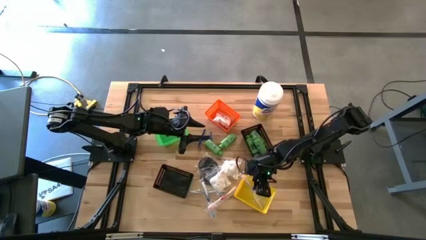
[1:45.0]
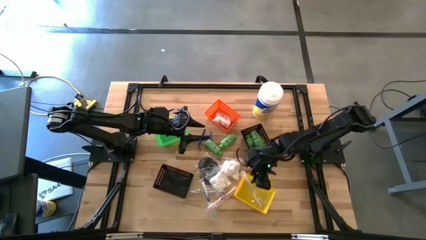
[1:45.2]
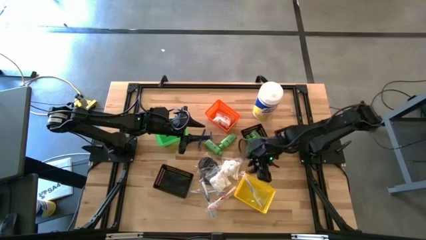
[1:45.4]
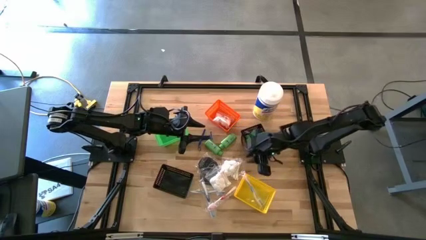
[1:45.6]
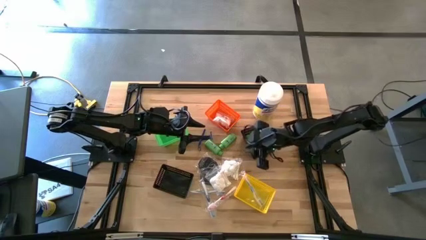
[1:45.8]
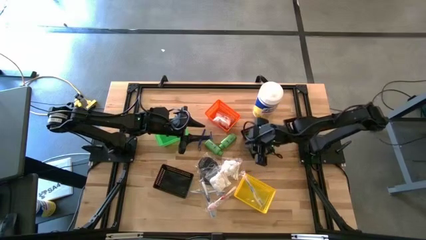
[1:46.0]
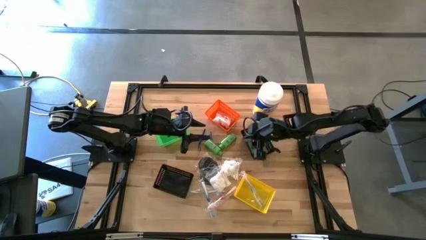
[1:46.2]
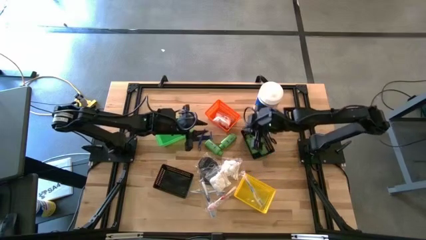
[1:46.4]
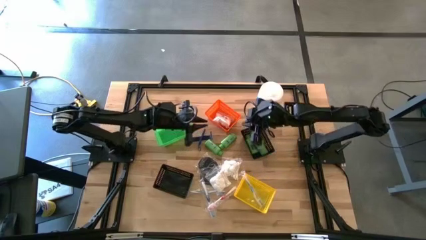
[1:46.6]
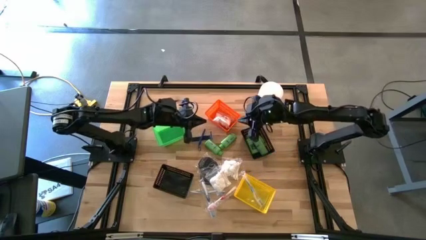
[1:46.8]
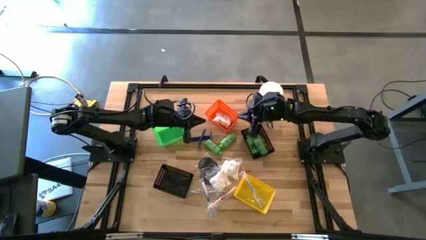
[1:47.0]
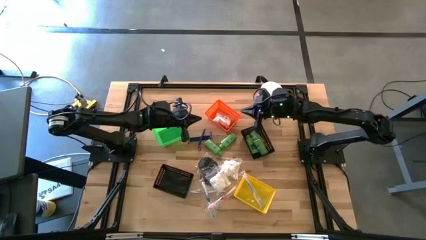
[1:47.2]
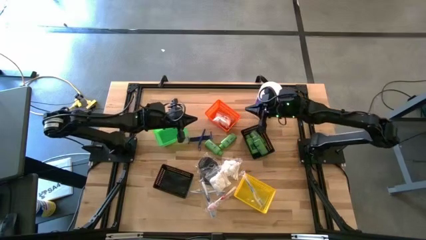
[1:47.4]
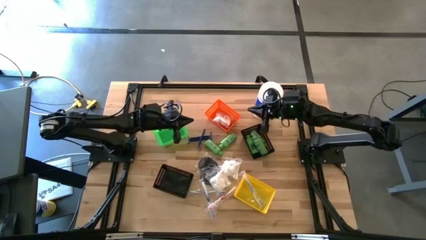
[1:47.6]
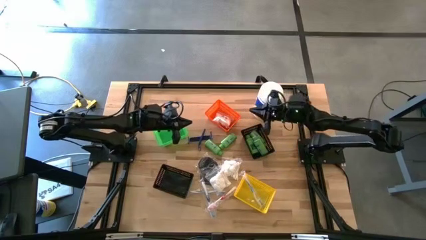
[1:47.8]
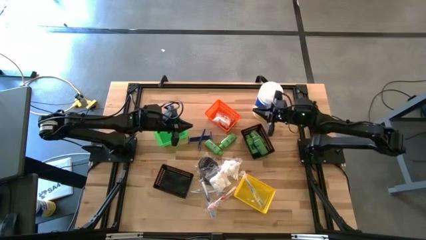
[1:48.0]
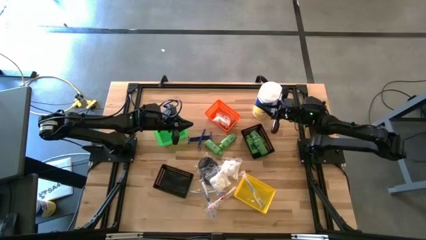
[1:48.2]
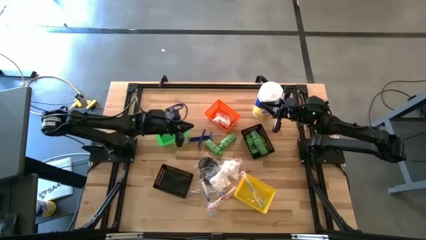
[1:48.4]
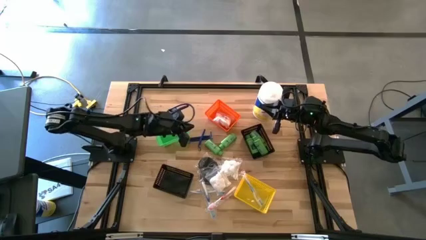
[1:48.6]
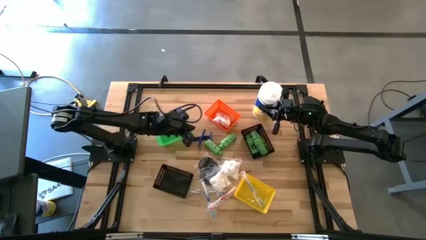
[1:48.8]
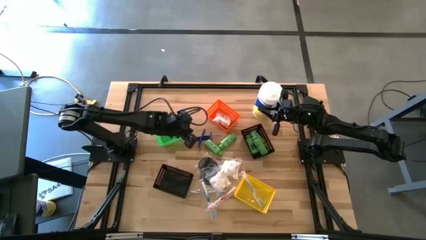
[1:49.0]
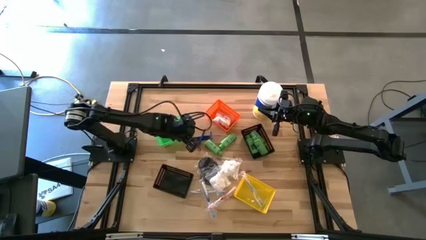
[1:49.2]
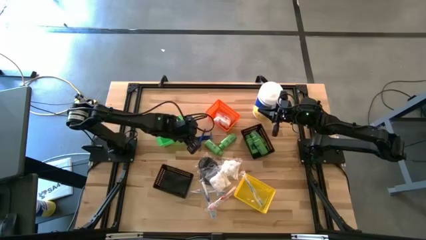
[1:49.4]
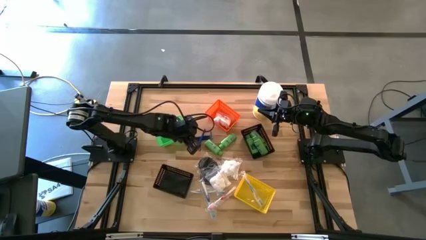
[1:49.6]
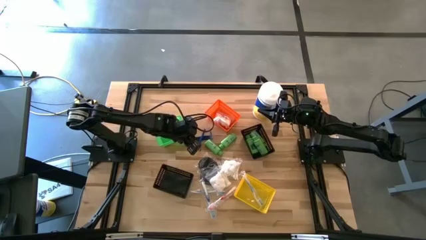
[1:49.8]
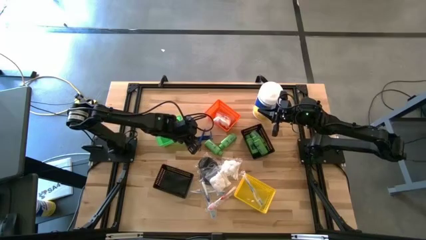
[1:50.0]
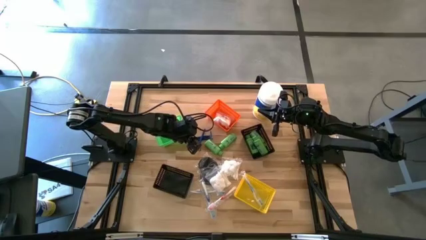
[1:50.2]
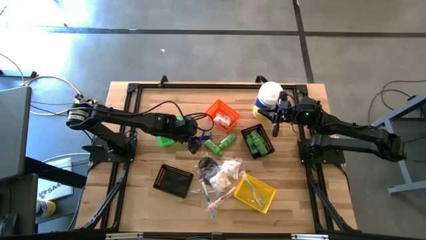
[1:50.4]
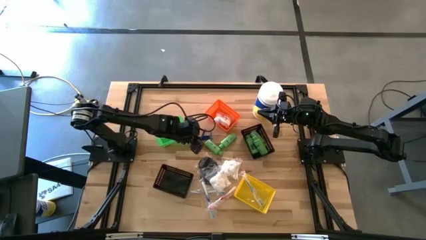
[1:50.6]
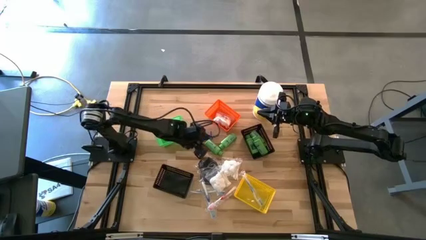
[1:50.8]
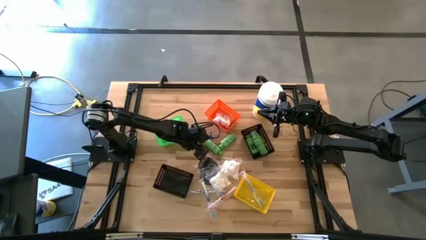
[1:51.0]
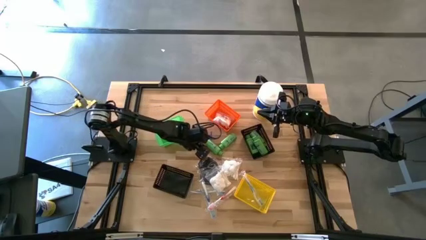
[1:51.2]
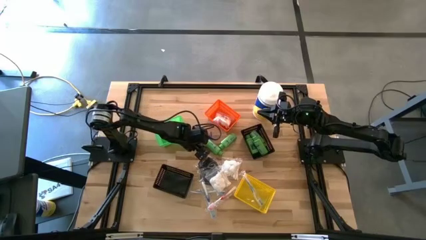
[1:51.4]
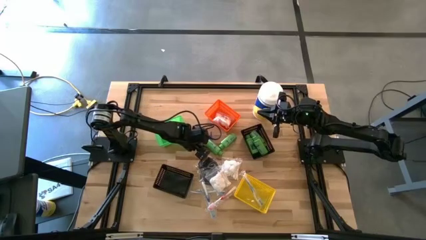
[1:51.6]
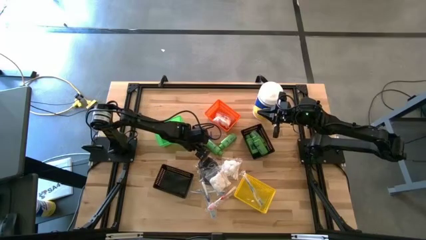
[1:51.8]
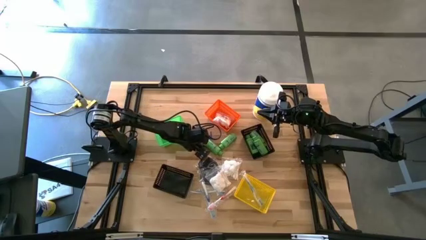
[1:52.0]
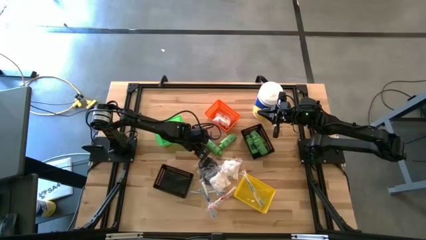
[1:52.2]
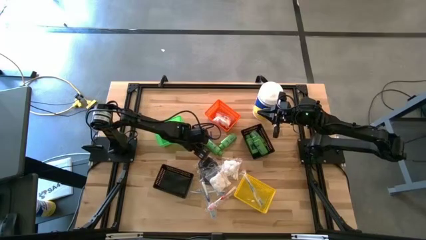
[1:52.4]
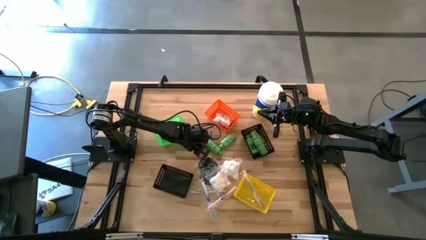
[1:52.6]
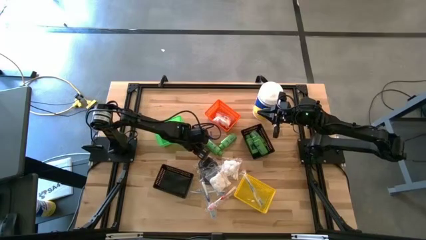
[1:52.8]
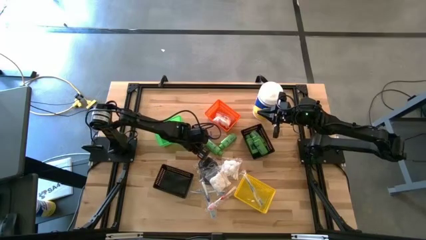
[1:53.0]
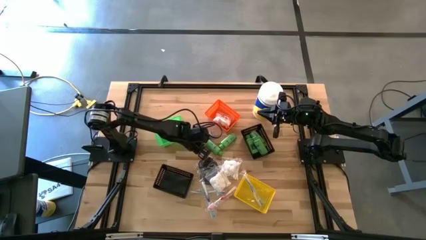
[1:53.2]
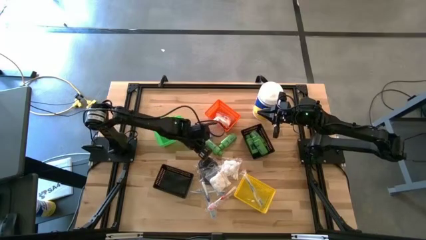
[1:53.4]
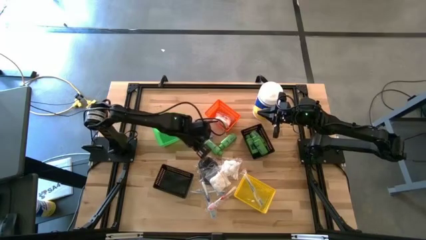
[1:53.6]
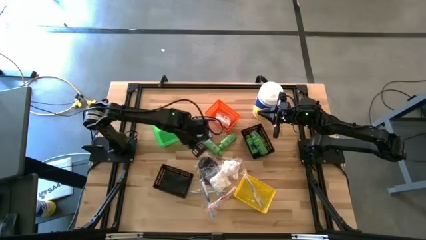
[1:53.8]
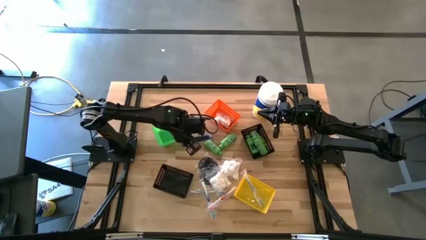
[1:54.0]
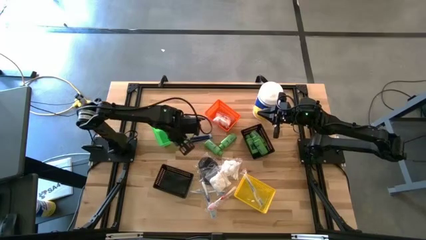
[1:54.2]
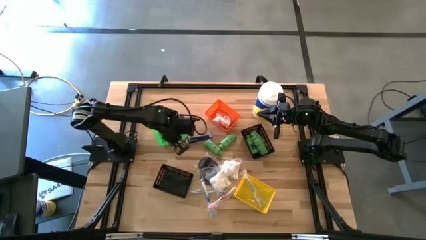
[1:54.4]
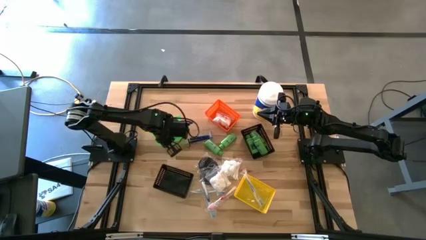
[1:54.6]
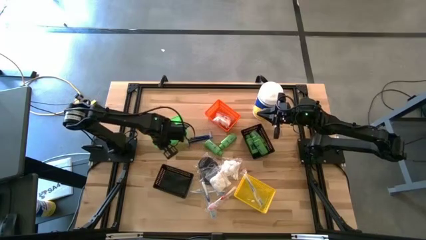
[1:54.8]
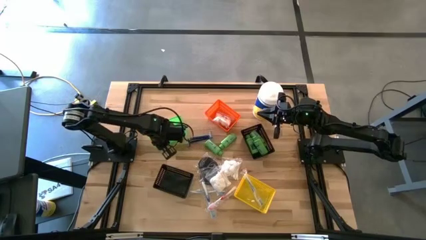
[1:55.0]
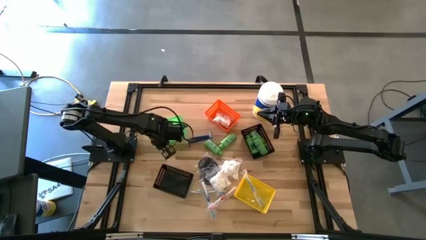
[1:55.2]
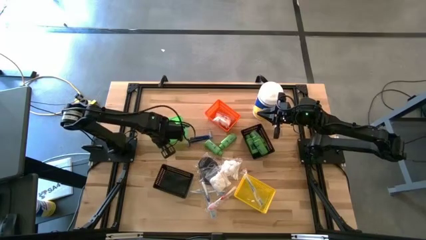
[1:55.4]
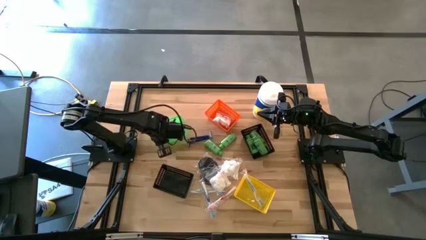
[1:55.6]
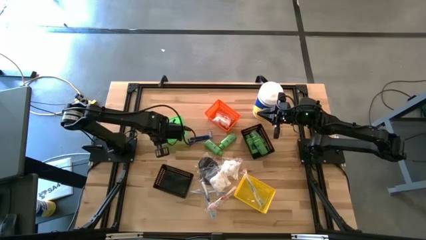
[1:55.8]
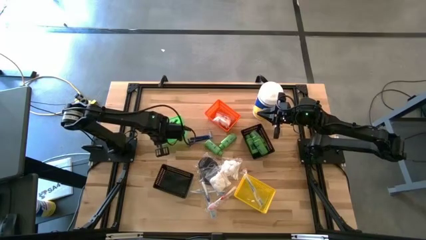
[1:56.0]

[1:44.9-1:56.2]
Task: Pick & Place Travel size toiletries
Put the blue razor into the green bin
